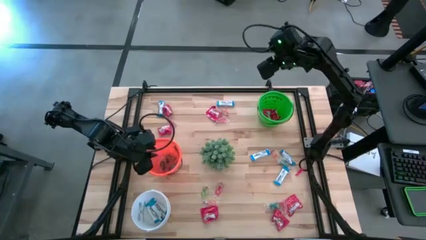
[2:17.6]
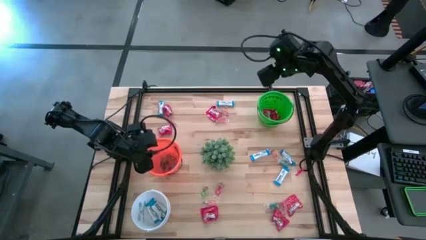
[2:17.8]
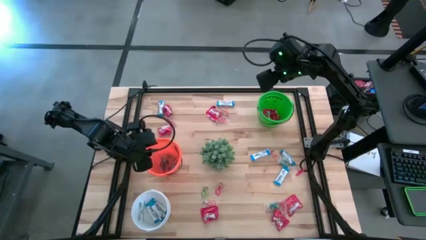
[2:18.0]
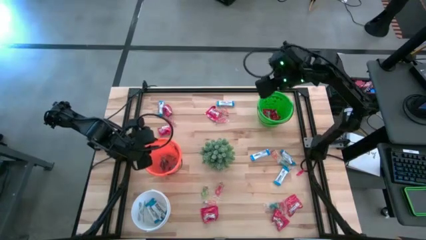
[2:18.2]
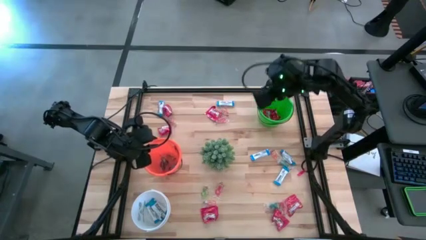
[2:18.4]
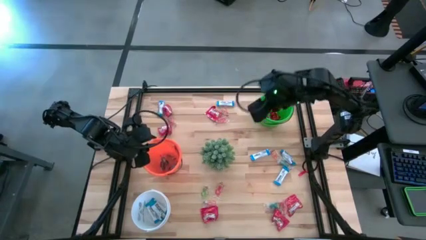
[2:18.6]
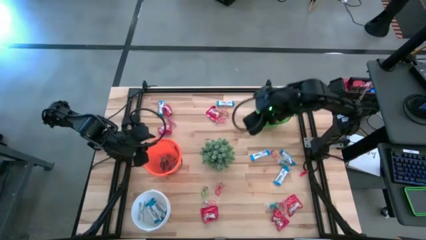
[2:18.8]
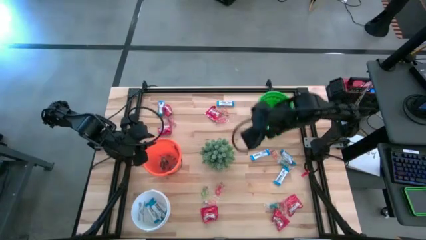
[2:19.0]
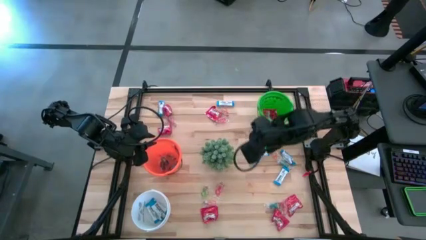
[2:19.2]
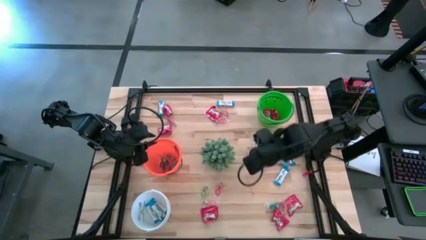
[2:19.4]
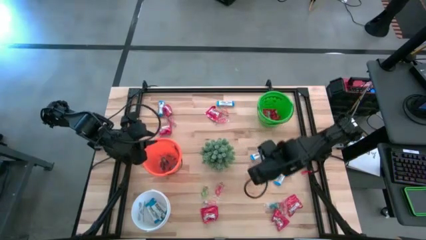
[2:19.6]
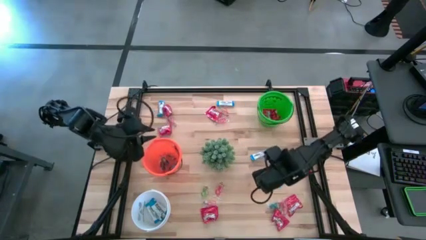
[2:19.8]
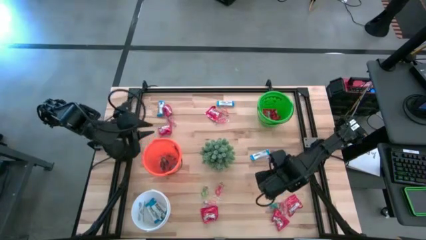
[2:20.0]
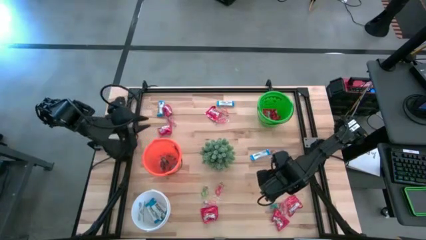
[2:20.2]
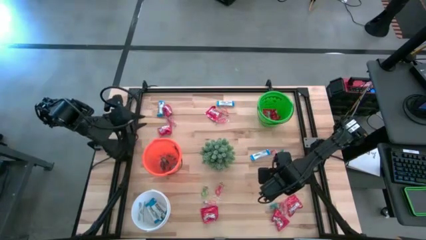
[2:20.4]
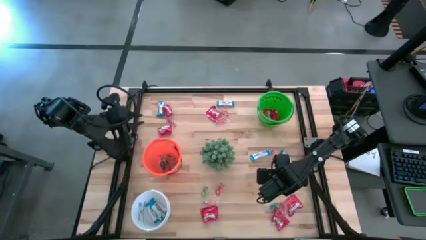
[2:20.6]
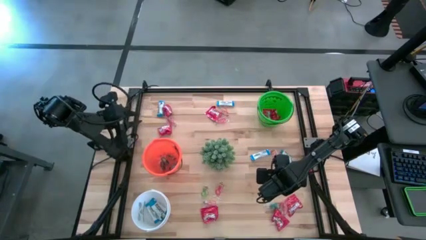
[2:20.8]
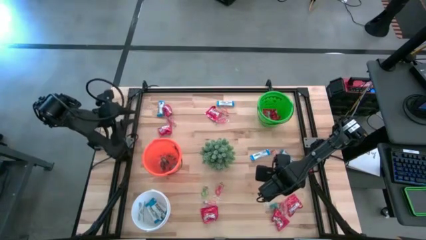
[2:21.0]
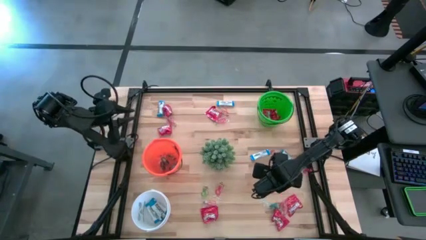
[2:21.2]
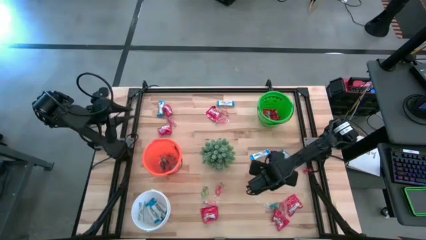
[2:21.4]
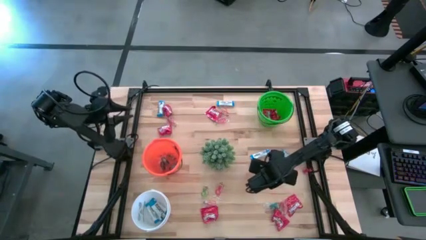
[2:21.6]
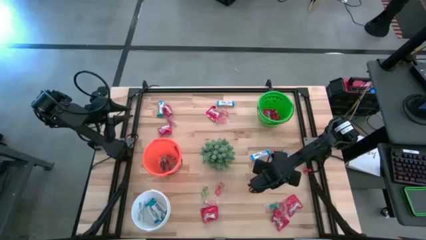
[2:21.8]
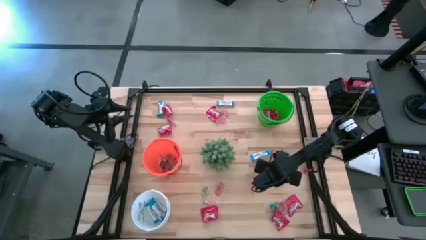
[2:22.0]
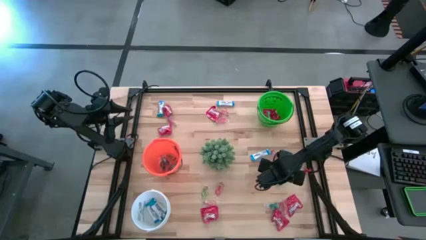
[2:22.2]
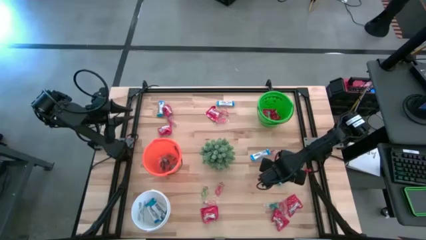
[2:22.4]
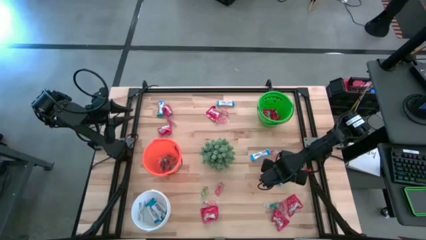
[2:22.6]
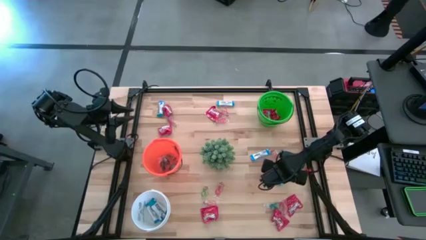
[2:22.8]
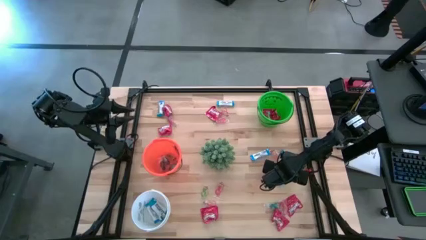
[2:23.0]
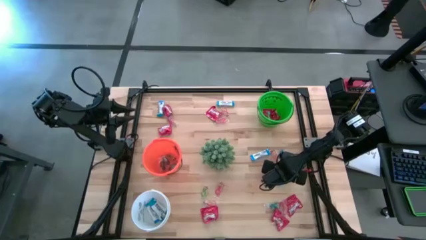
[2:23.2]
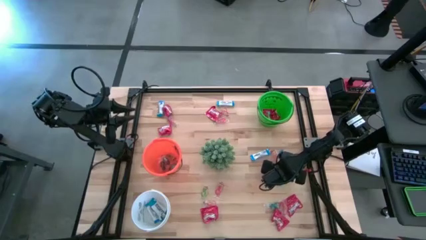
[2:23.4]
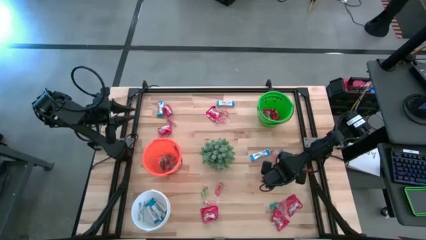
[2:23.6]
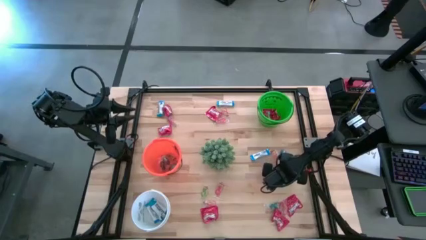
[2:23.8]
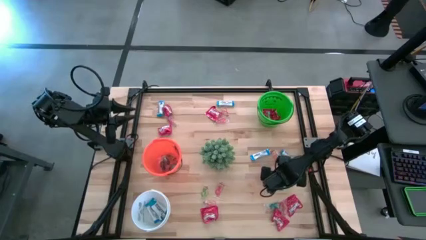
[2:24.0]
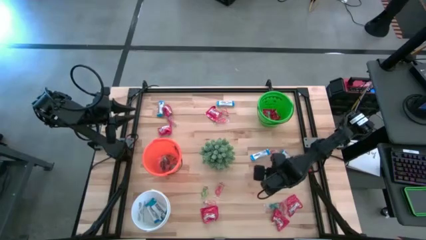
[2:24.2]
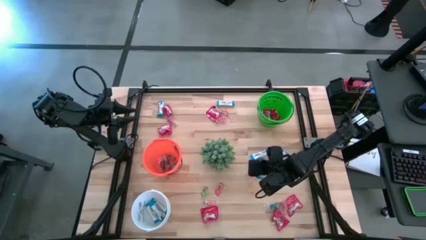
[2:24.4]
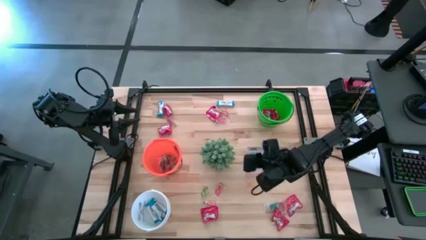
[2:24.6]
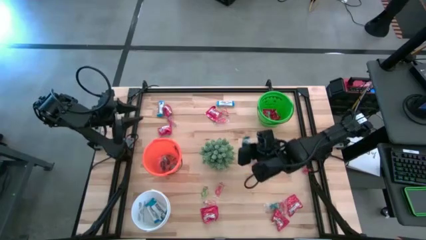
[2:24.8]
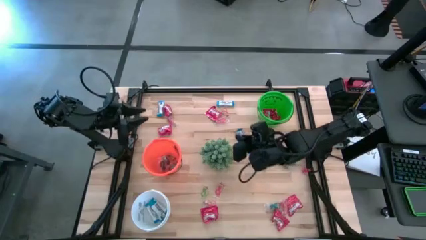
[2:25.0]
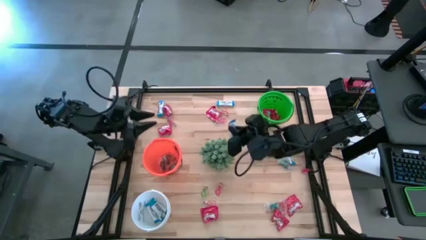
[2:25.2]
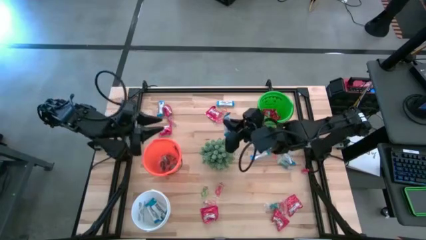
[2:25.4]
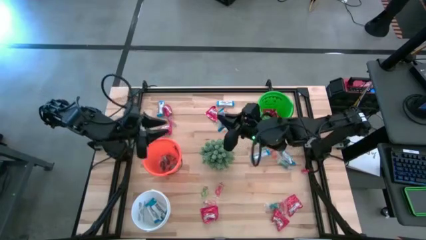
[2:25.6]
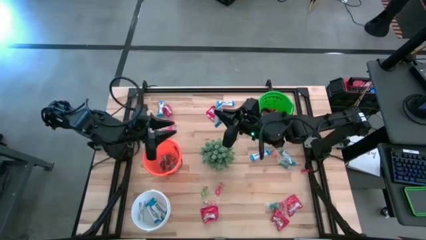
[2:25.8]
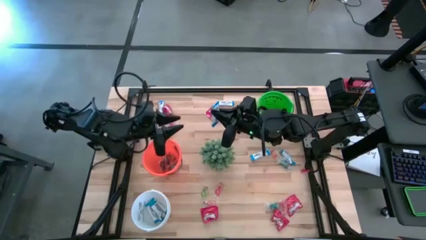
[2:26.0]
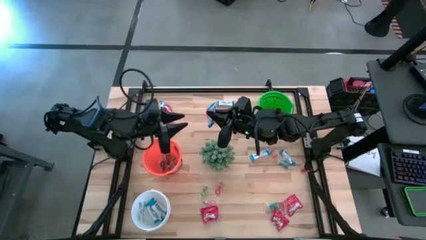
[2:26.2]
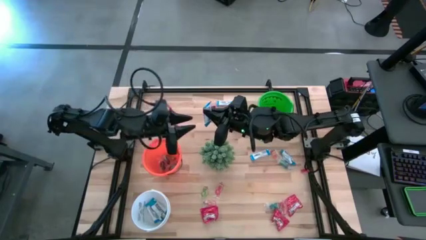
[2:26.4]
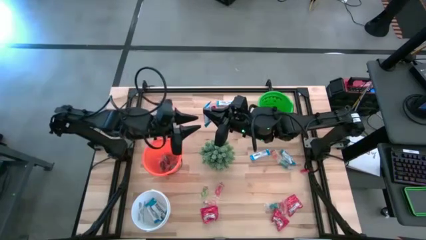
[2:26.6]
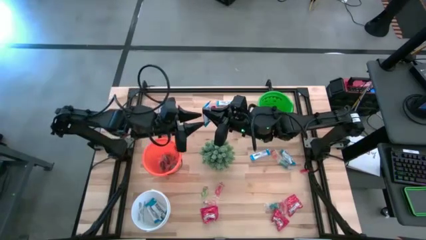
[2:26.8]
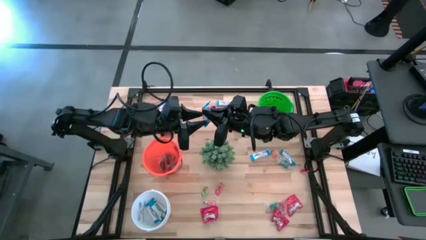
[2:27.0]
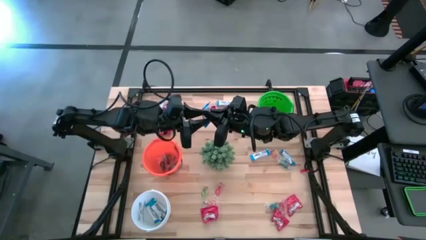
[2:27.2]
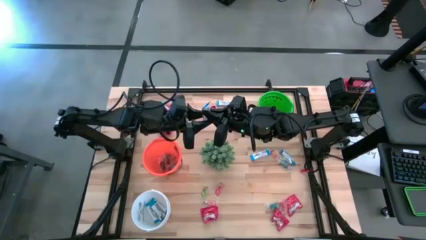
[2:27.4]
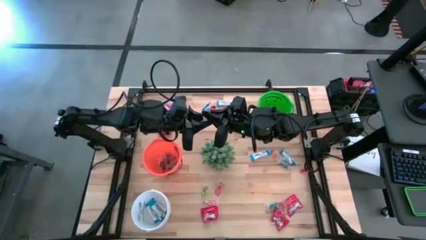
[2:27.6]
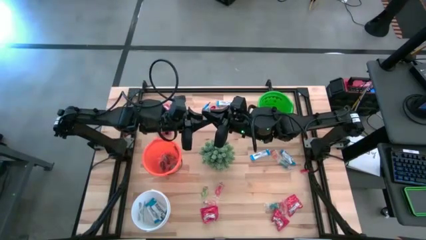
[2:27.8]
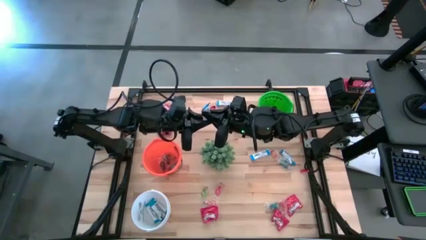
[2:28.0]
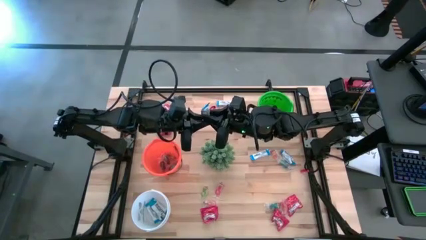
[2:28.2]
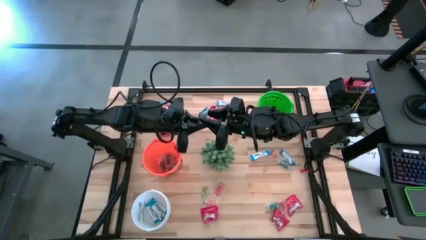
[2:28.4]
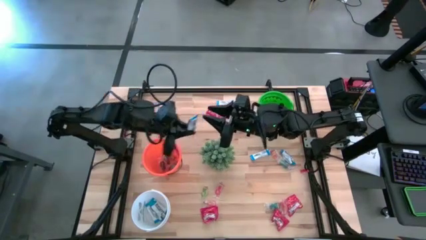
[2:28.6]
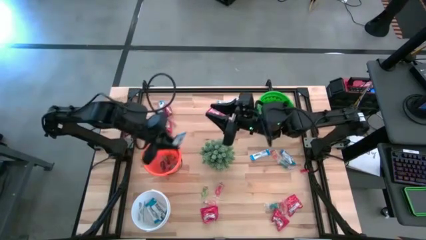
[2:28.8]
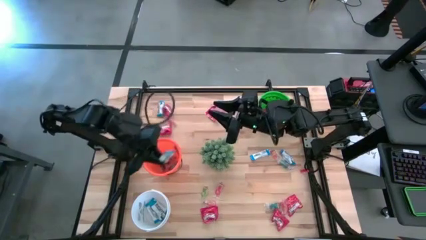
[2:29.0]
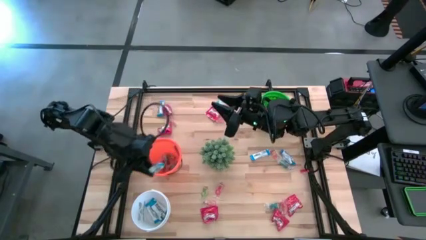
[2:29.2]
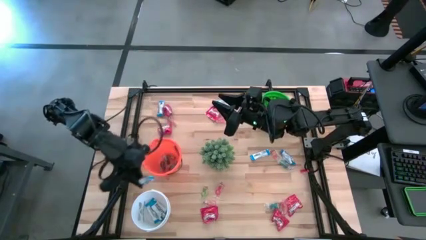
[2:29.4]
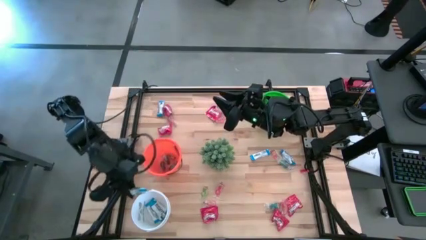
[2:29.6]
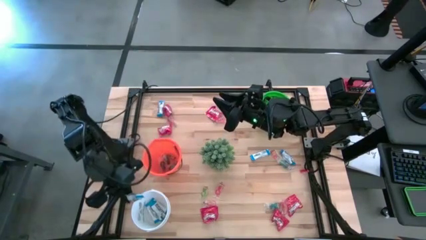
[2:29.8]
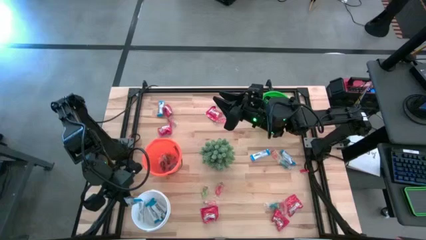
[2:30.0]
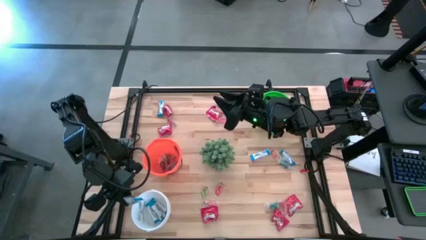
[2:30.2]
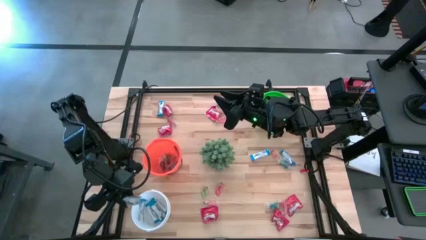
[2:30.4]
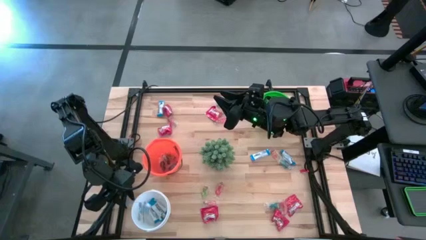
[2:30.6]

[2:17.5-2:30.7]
Task: Sort candy
Put the white chocolate into the white bucket

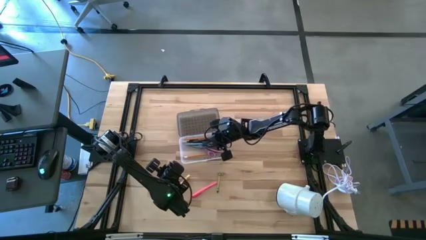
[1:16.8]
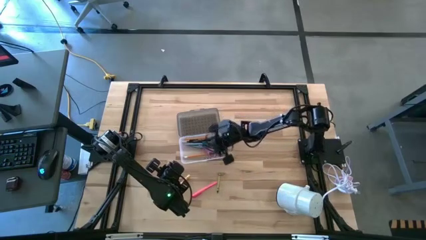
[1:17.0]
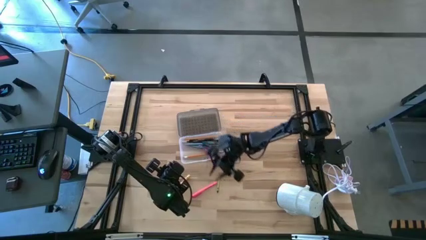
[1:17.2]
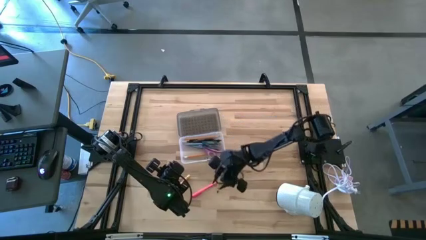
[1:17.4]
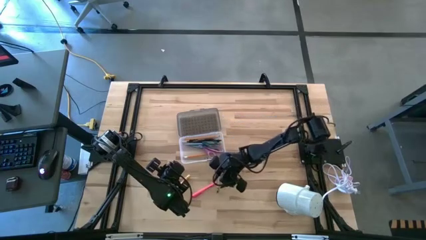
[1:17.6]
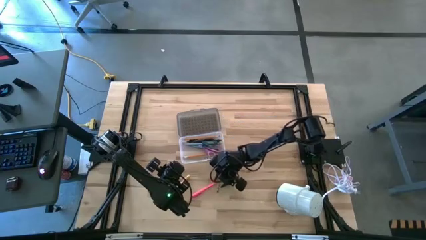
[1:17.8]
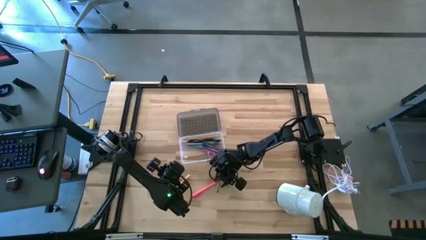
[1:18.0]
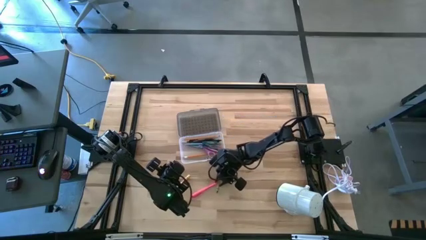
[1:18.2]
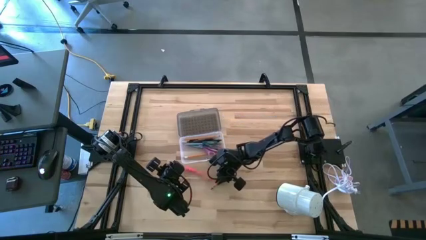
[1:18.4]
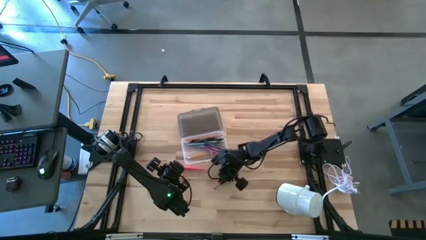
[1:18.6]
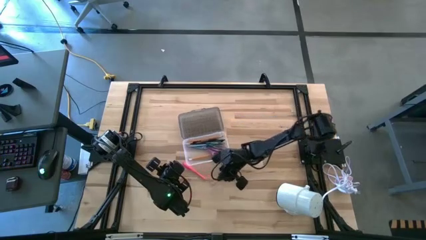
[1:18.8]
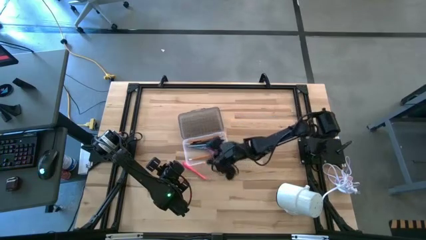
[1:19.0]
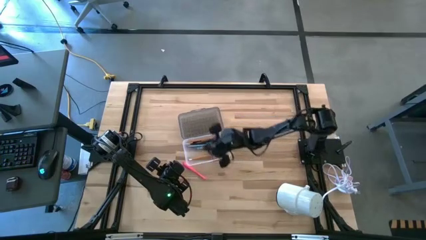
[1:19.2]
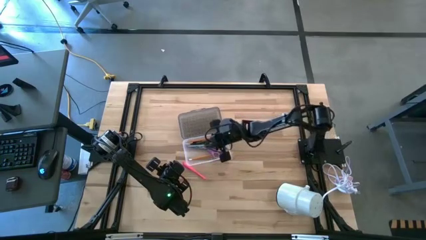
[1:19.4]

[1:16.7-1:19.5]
Task: Pick & place school supplies into a supply box
Put the green crayon into the gray supply box

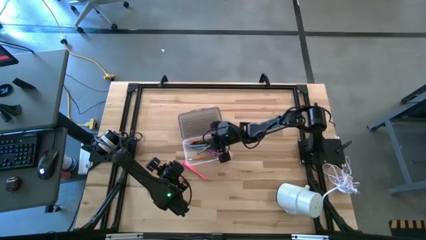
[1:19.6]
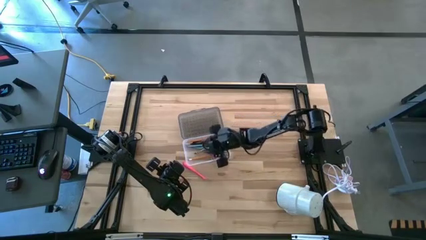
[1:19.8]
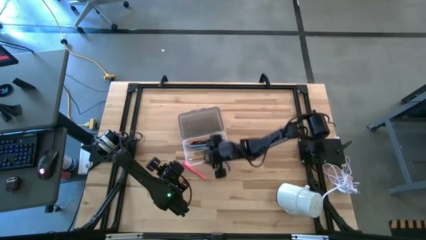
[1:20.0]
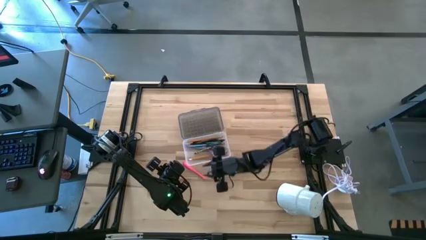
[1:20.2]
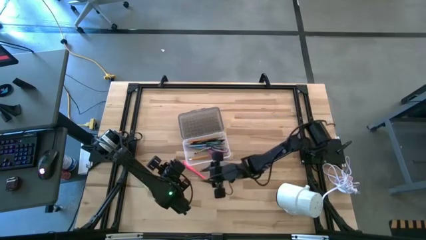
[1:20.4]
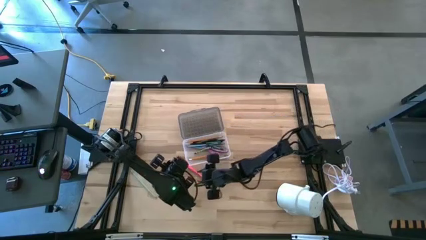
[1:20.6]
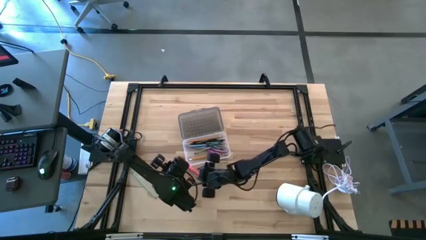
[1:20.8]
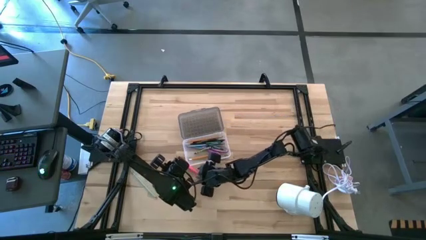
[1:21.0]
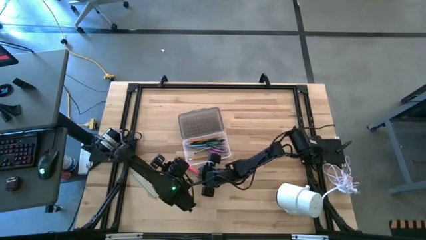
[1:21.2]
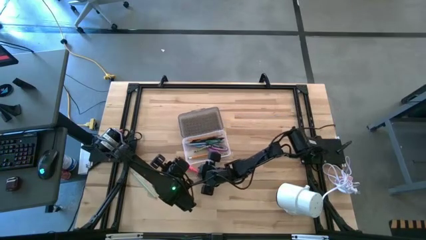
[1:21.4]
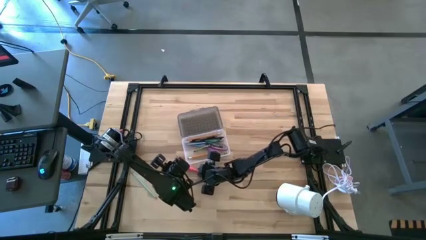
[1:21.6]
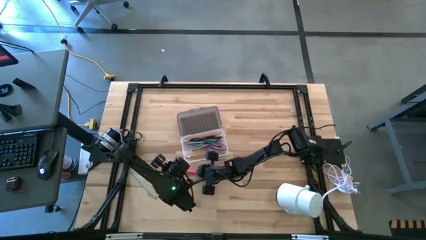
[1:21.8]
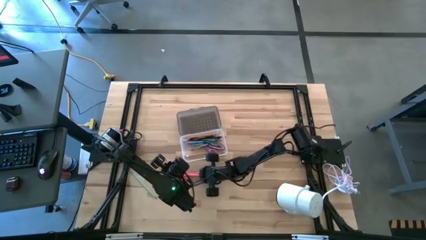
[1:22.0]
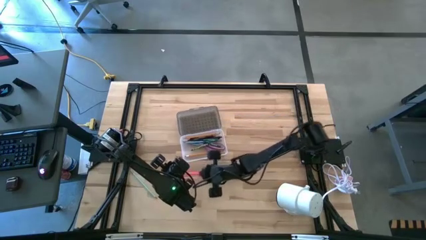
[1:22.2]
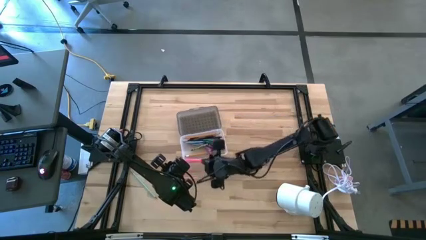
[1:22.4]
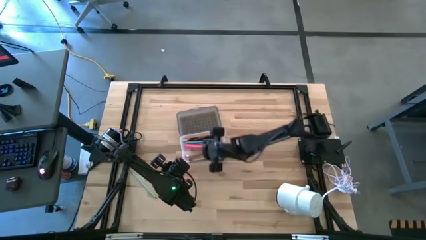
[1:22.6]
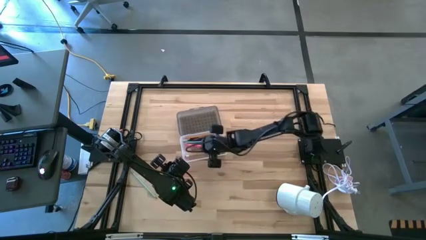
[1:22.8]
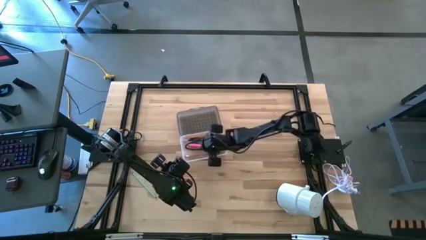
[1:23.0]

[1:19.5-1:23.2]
Put the pink pen into the gray supply box
